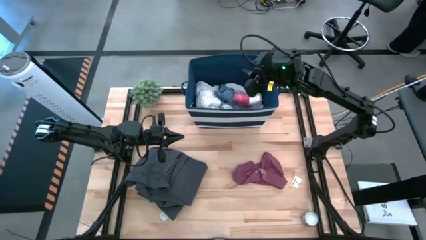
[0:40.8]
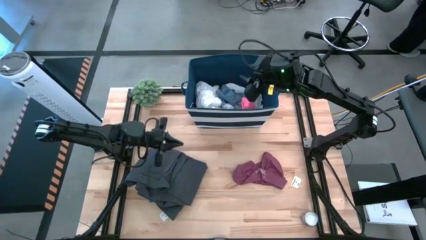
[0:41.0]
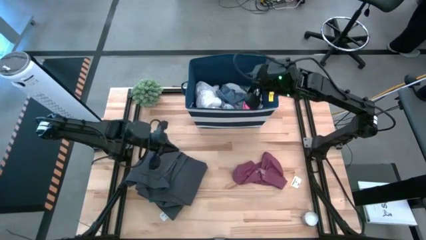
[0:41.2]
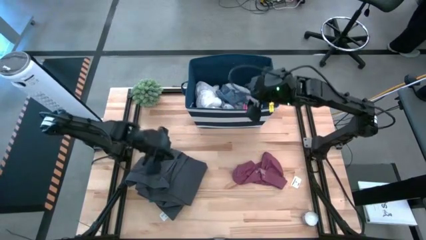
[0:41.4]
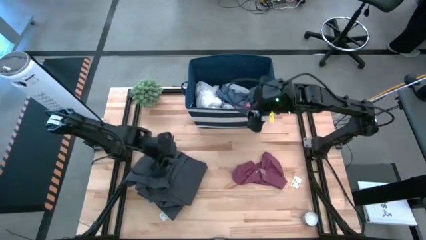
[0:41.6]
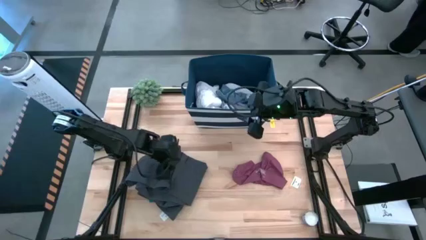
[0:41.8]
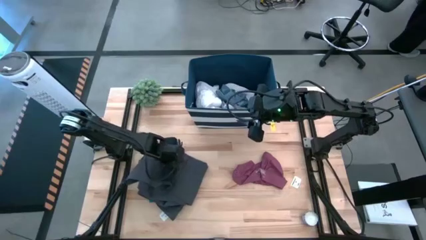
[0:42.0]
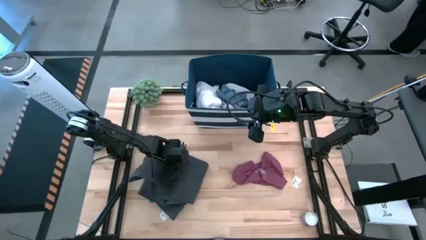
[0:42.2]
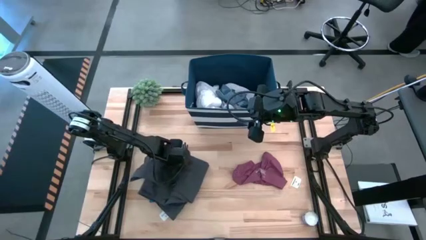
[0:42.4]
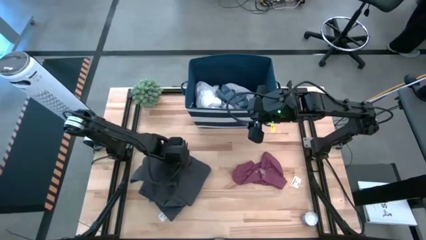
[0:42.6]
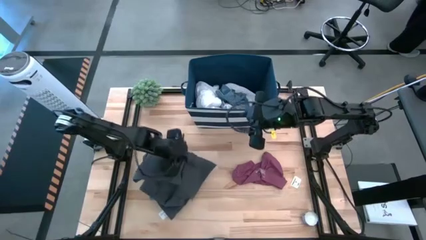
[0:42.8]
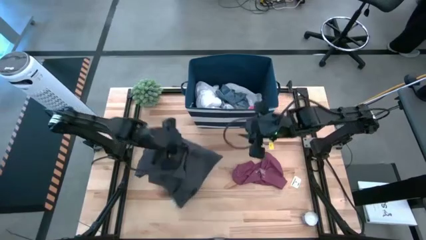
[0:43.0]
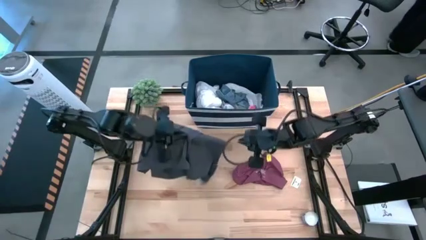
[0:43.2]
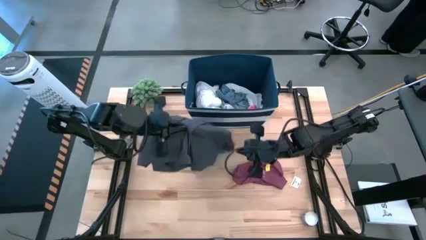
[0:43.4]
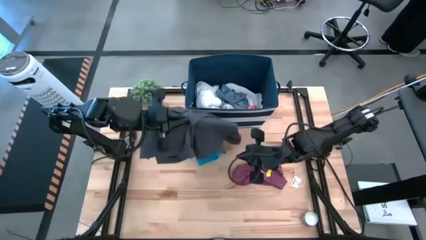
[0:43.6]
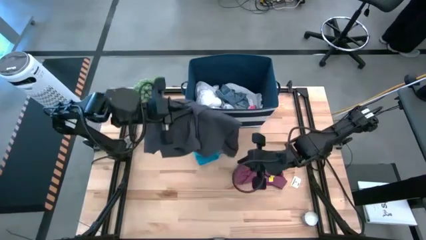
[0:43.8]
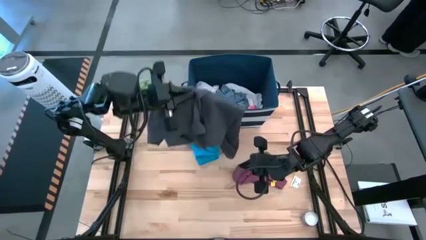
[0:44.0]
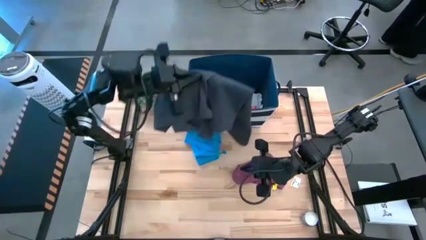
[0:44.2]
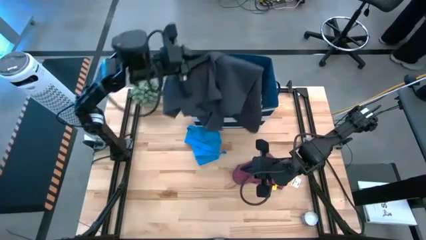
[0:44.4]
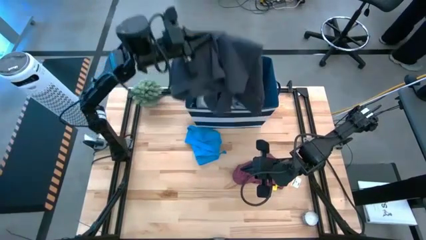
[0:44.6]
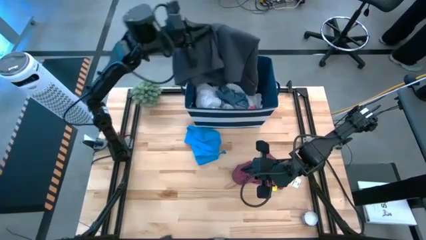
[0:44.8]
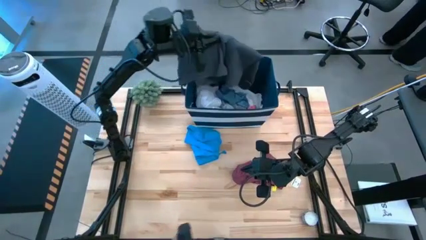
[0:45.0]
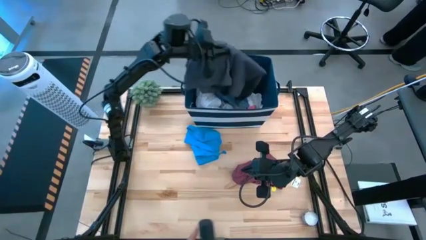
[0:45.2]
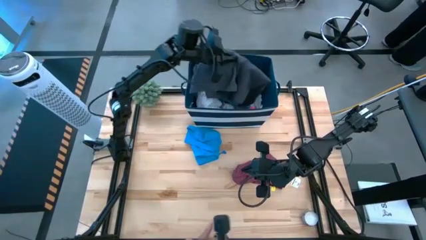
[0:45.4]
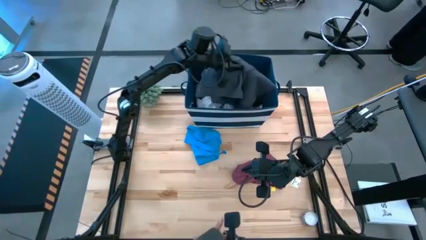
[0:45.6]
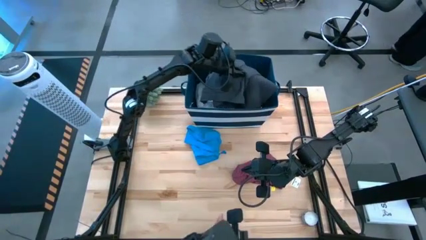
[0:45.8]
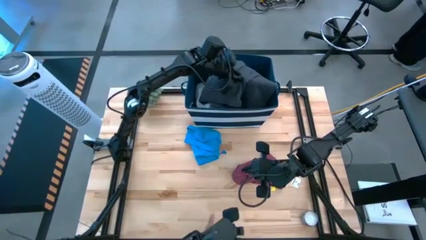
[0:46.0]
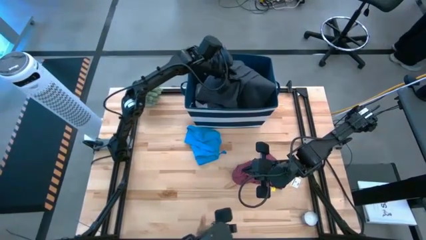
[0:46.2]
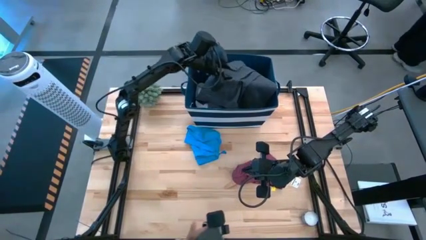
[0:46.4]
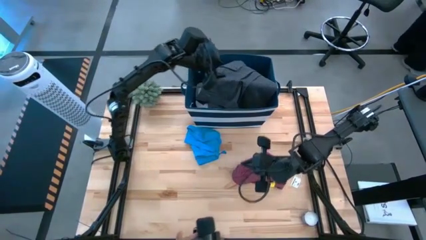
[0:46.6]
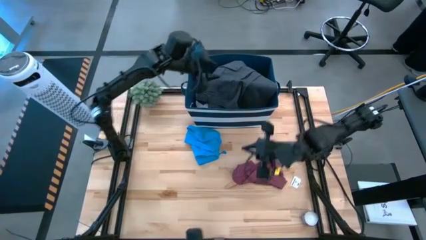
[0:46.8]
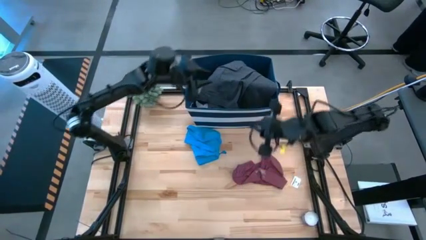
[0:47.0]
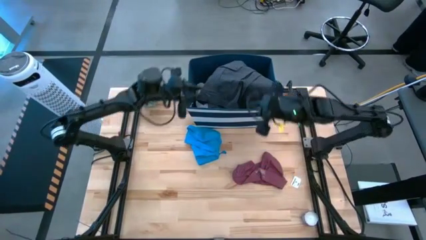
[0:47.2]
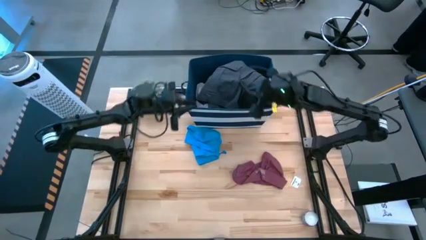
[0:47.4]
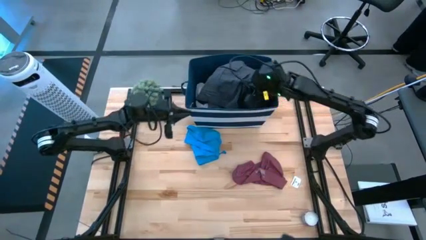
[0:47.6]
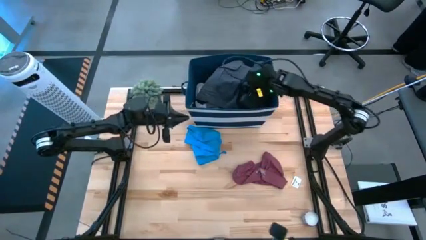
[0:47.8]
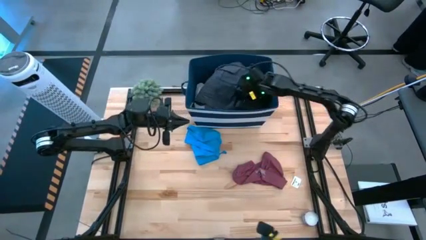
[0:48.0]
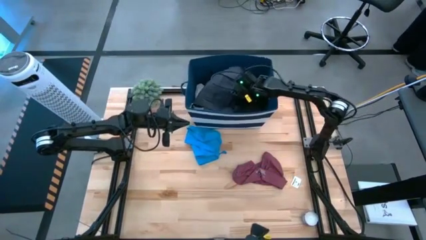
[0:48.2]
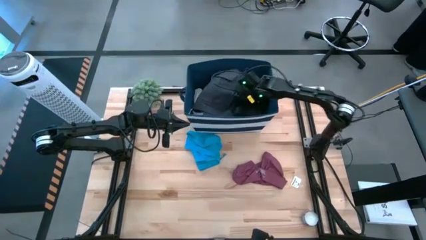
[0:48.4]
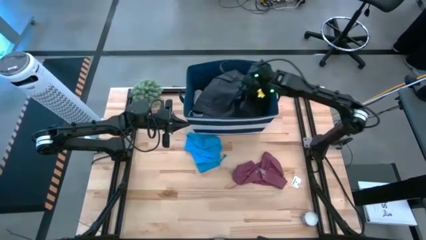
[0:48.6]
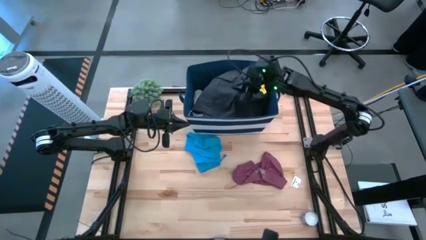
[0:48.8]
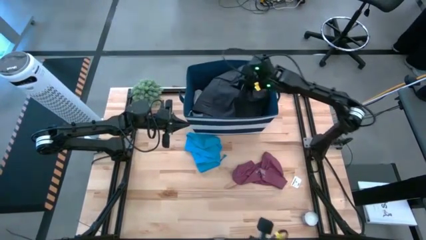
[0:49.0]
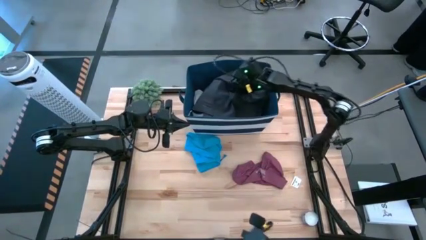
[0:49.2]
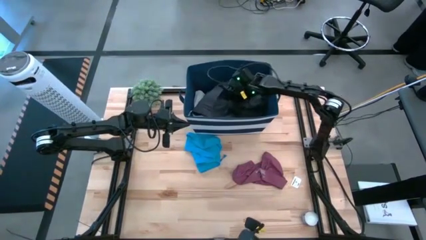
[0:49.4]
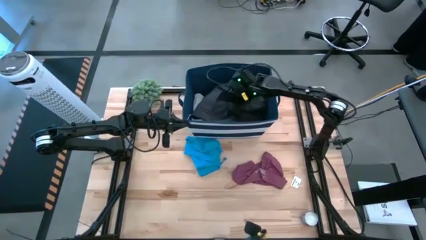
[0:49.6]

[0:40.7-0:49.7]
Task: Sort clothes
Put the black shorts into the blue laundry organizer

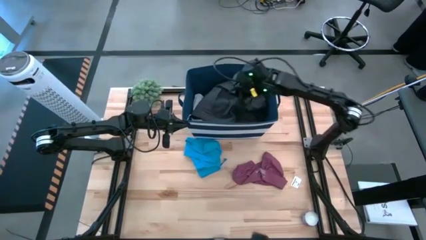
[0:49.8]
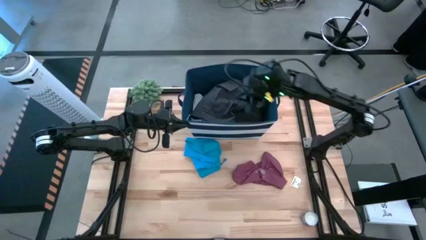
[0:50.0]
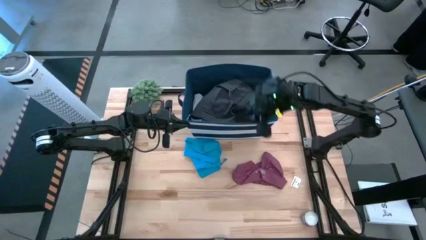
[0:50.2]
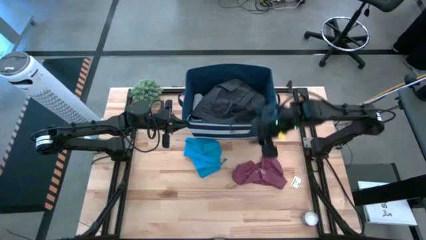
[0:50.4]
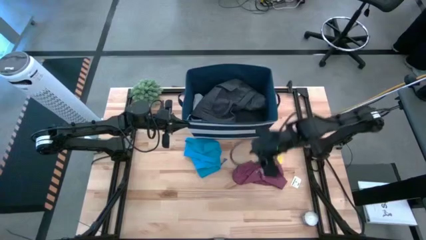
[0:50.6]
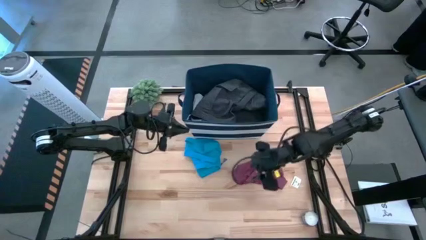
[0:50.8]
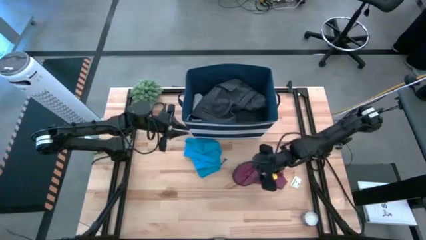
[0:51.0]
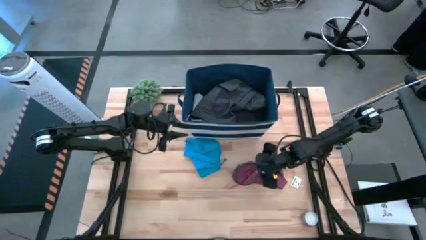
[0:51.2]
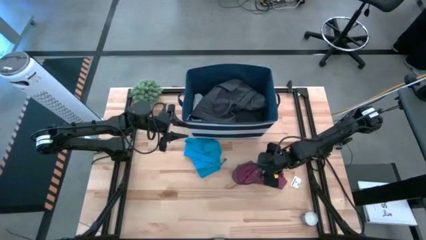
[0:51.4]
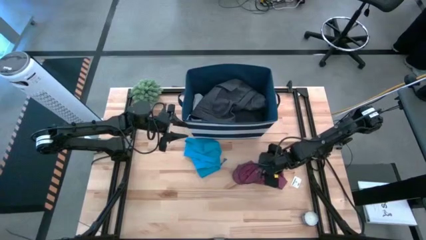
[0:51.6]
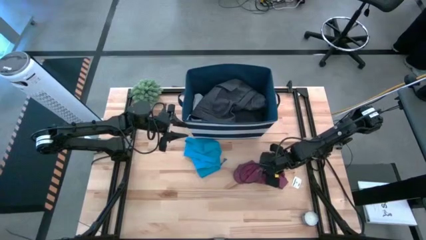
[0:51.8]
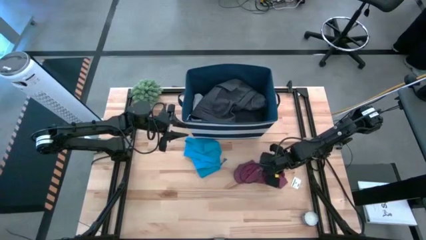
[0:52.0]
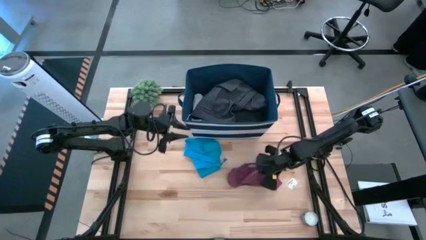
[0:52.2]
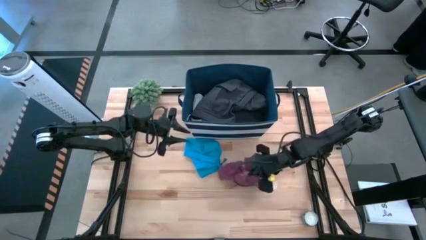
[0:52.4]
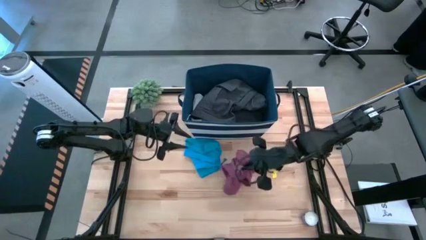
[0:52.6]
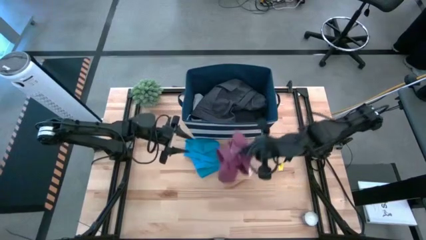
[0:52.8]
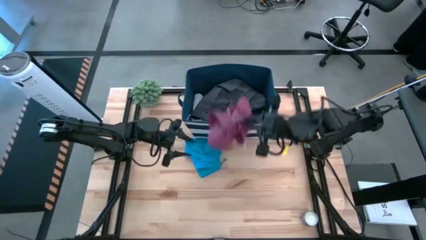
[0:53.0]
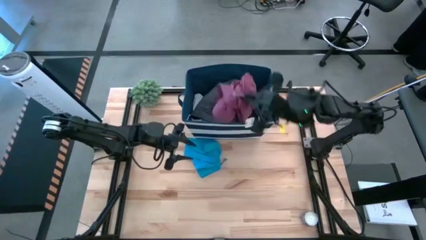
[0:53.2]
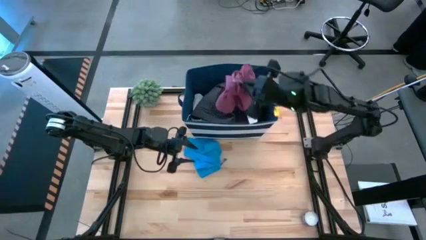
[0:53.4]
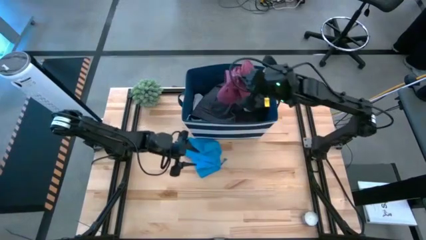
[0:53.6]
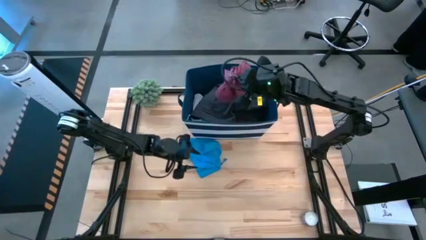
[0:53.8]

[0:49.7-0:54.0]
Put the maroon boxers into the blue laundry organizer

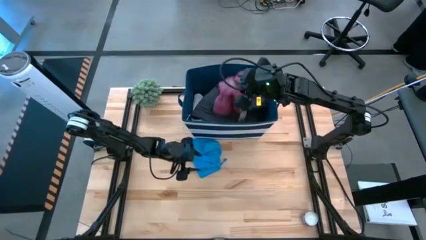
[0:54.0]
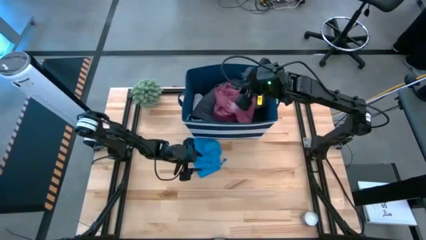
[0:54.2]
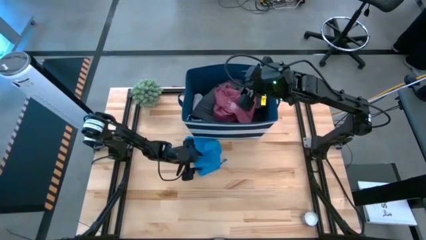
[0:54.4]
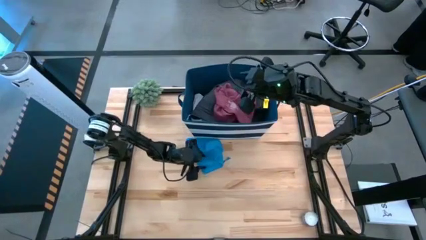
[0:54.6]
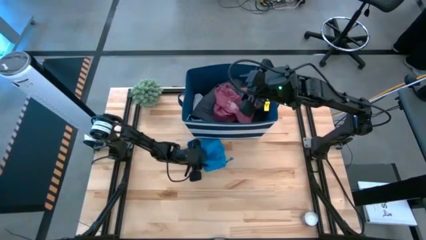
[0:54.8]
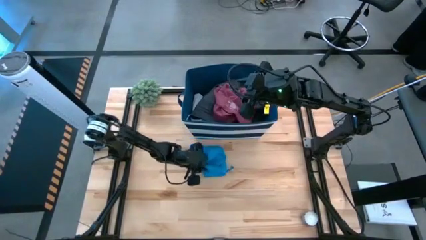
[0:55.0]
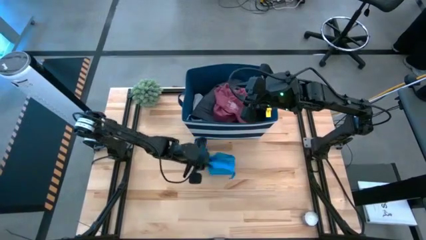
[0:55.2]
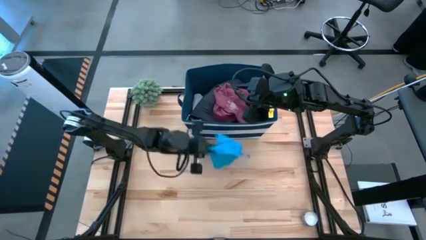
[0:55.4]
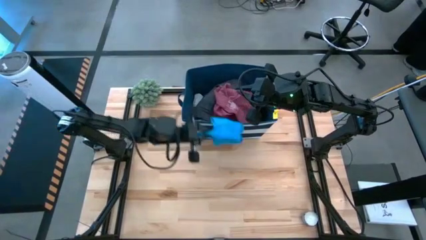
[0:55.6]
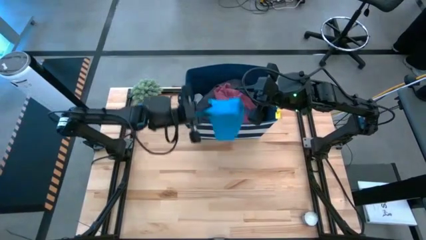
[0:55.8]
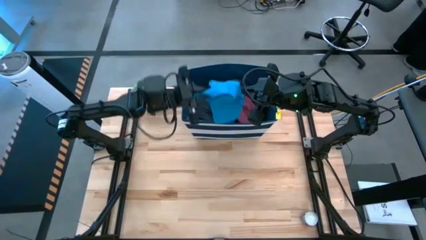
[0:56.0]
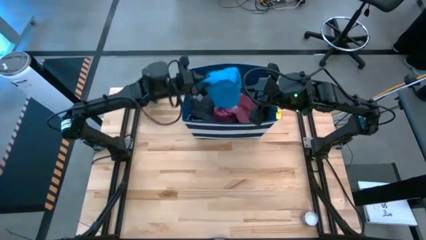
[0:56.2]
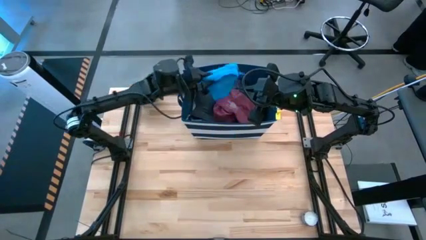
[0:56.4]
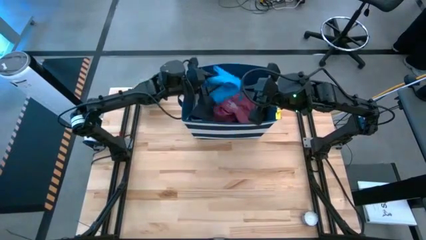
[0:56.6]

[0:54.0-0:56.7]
Put the blue boxers into the blue laundry organizer
